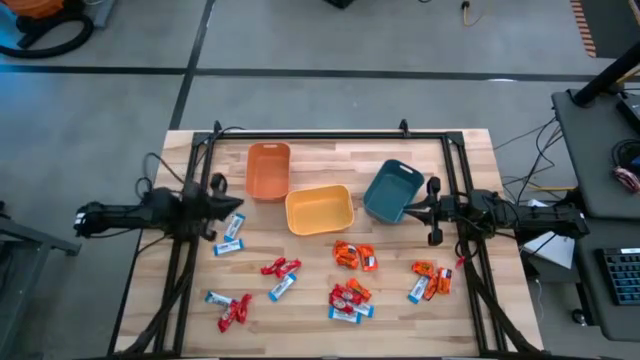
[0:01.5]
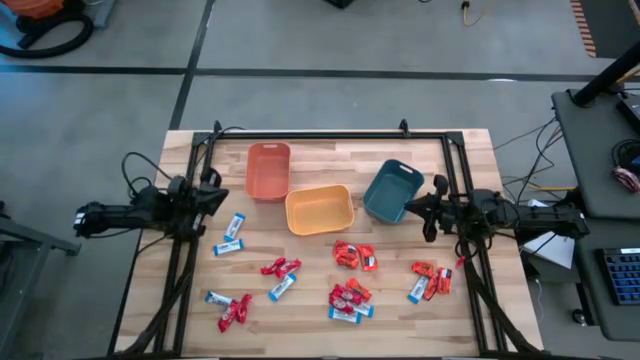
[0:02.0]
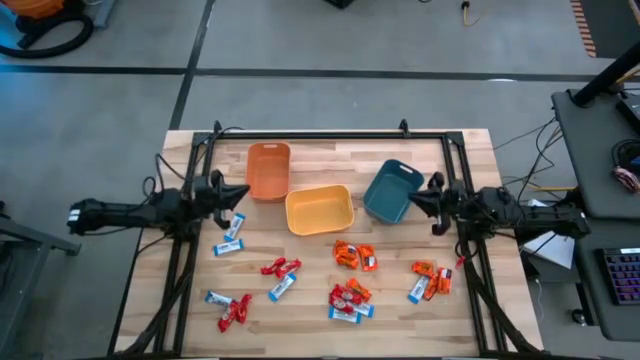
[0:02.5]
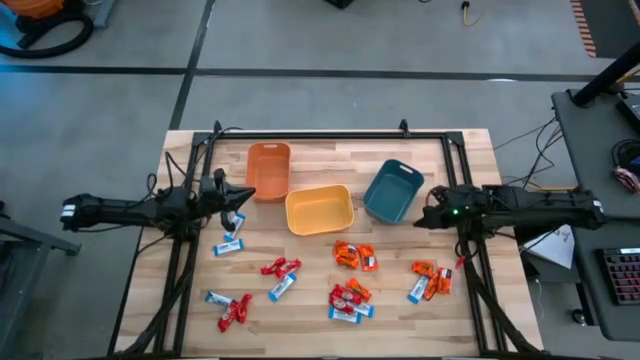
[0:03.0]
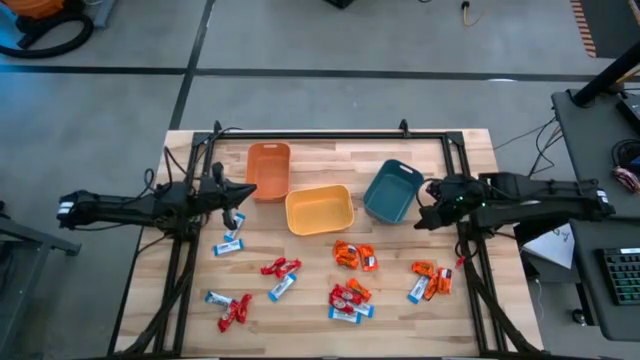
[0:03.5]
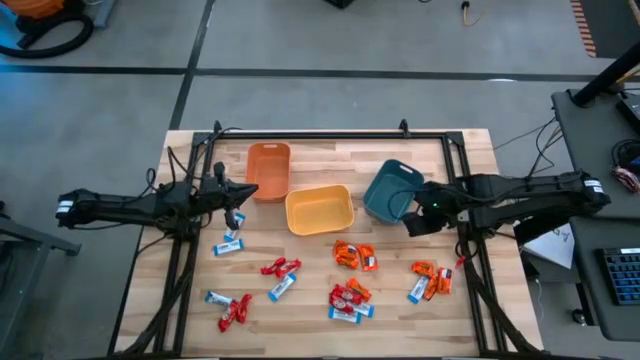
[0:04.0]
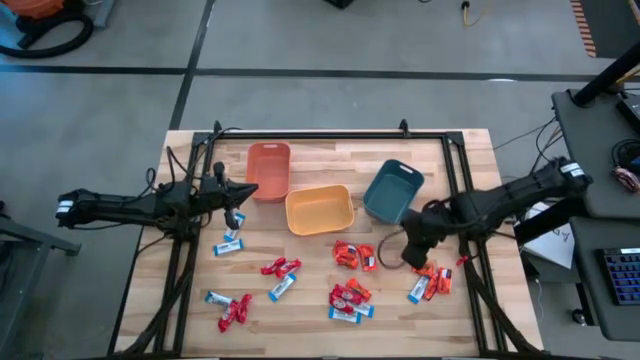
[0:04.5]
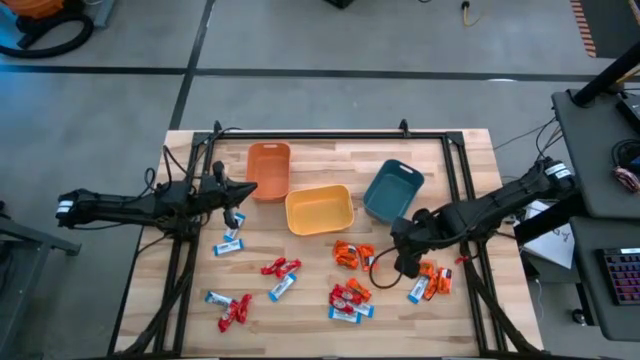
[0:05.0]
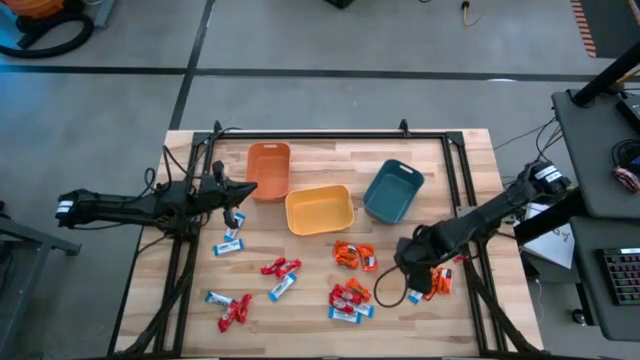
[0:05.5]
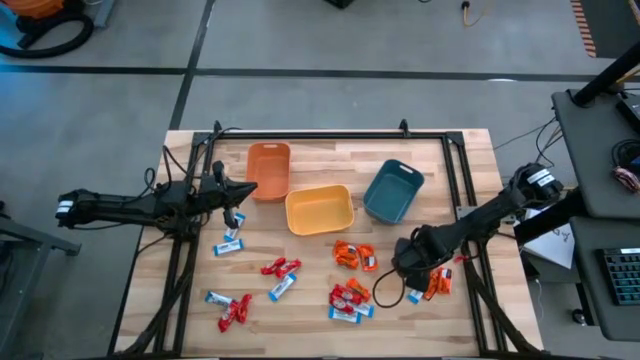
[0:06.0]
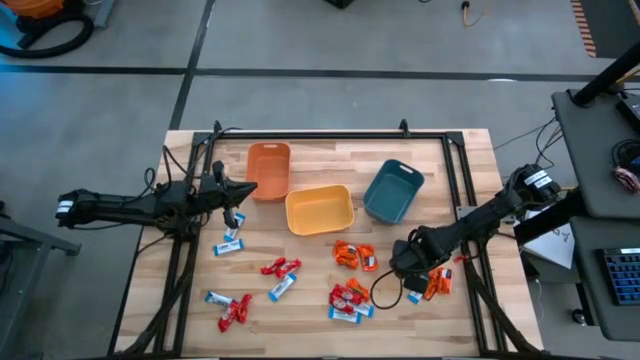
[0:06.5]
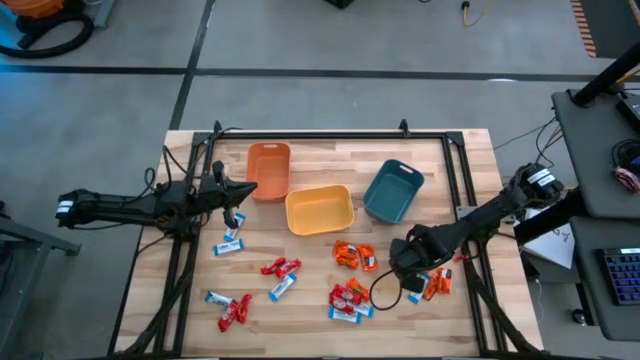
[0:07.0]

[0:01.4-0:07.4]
Task: Sort candy
Put the orange chocolate into the yellow bin

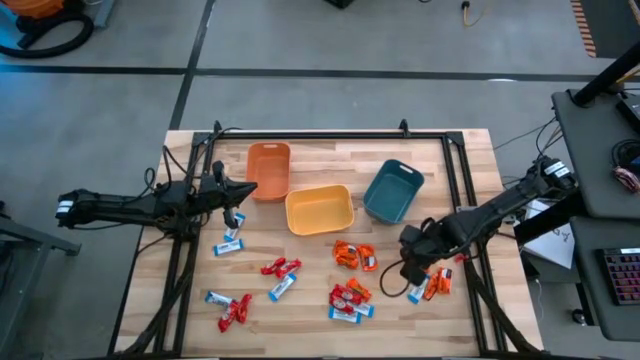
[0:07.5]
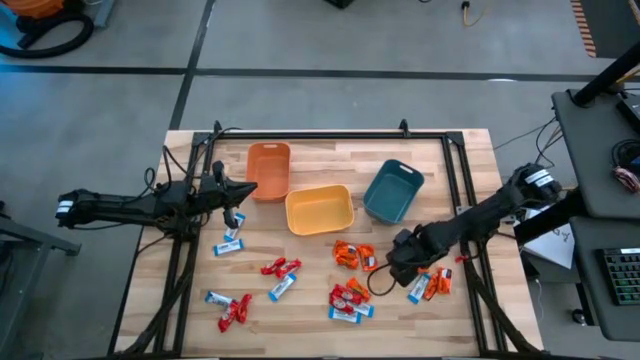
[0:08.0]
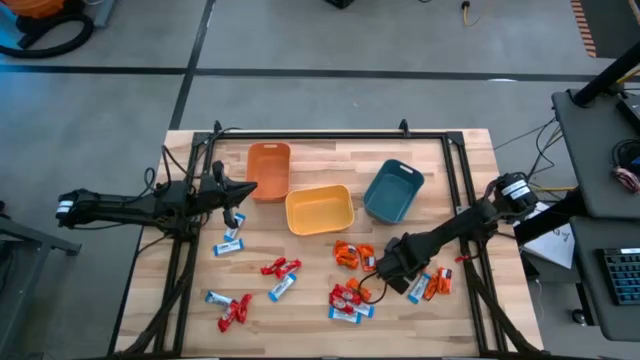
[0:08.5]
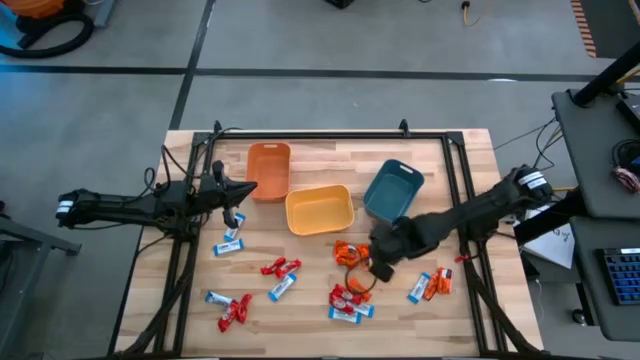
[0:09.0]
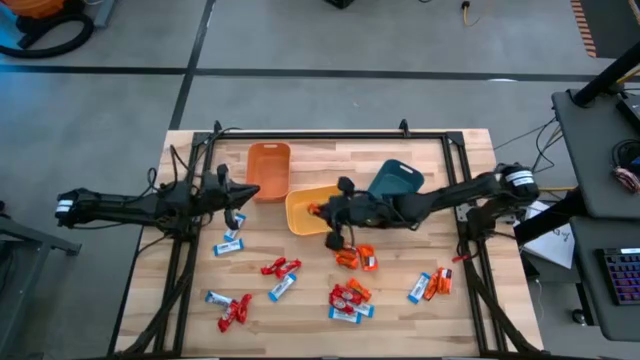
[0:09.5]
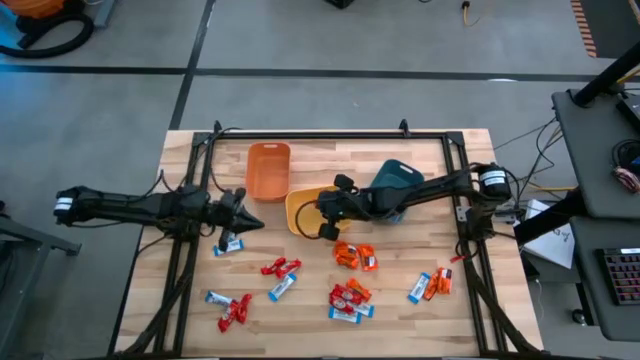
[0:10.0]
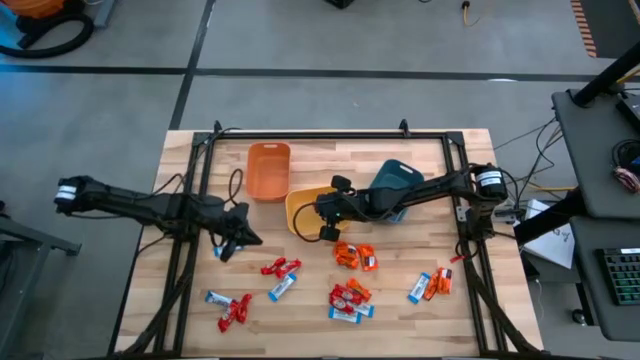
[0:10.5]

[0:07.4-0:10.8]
Put the orange chocolate into the yellow bin

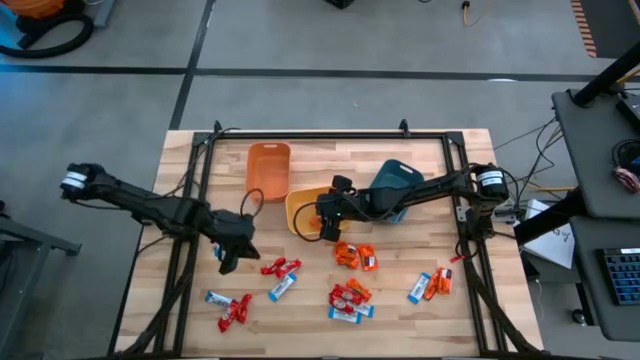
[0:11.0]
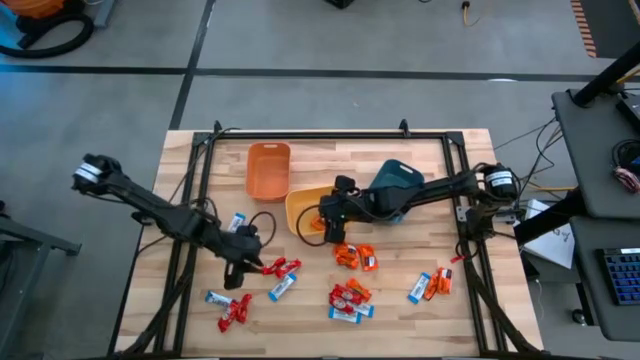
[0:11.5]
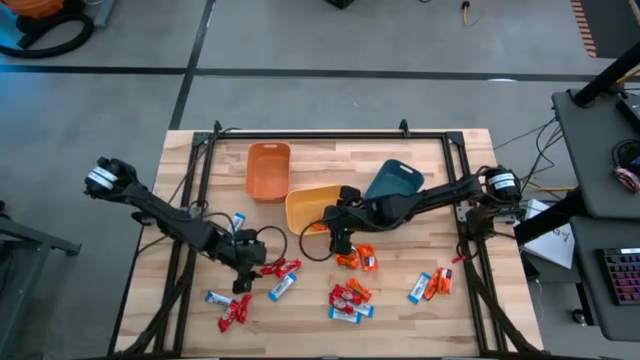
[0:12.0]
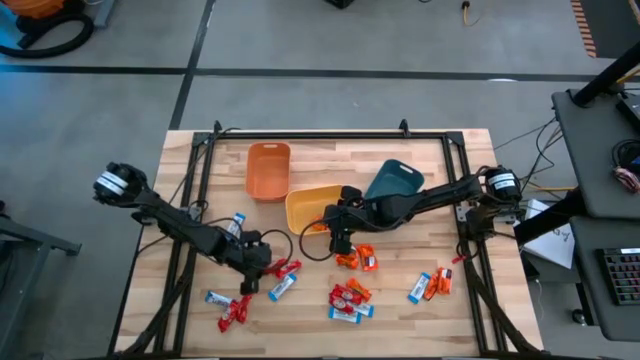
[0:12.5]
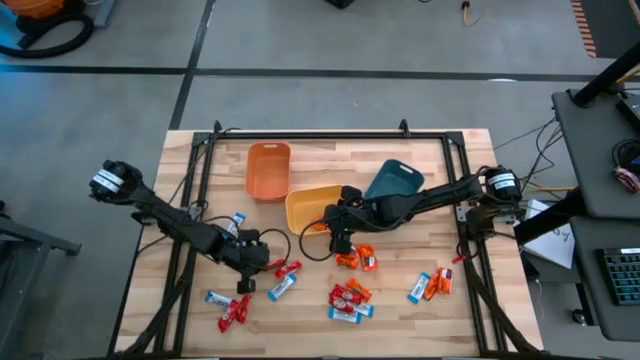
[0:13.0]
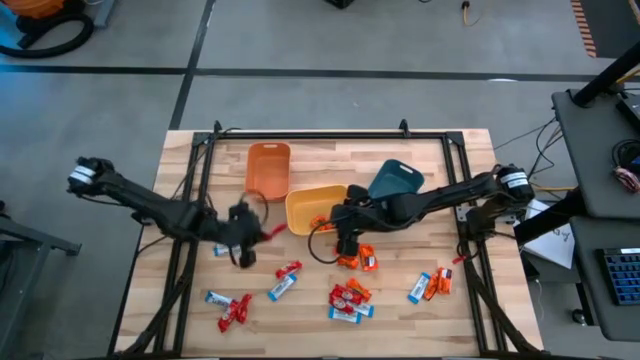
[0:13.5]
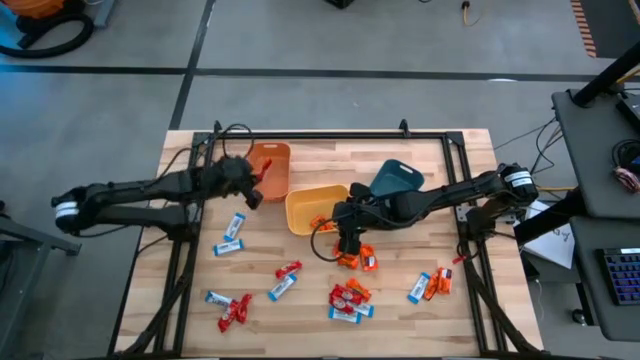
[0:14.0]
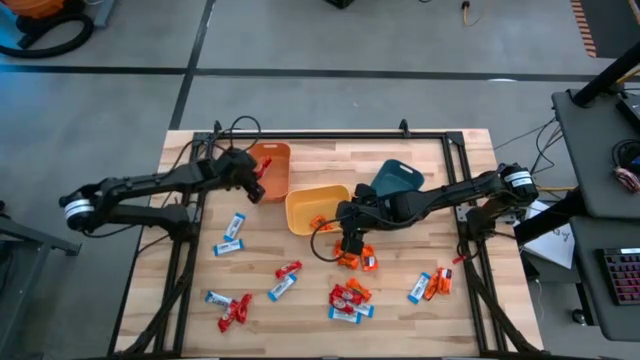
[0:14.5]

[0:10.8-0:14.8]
Put the red chocolate into the orange bin

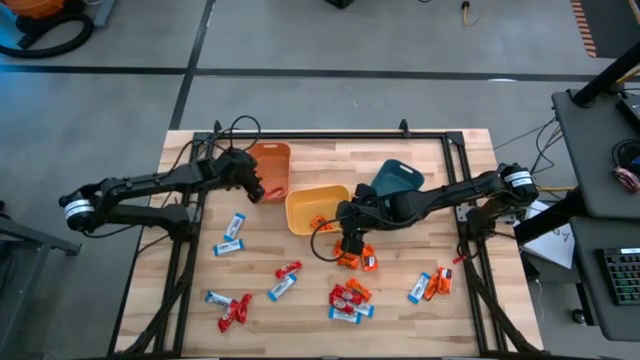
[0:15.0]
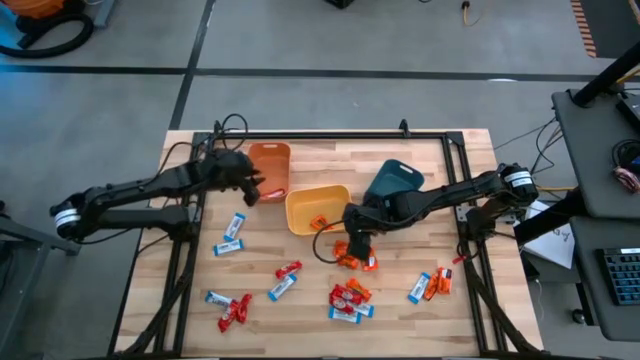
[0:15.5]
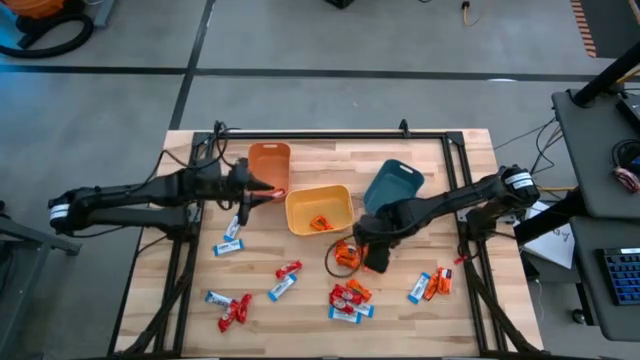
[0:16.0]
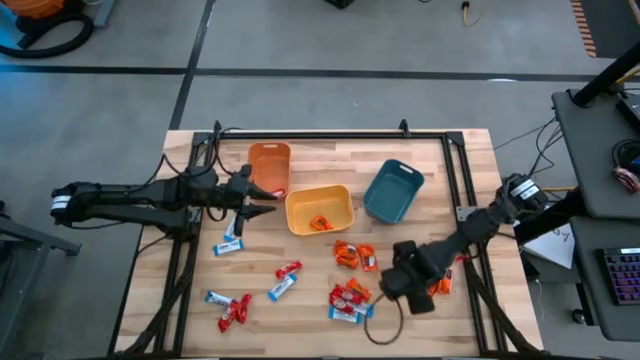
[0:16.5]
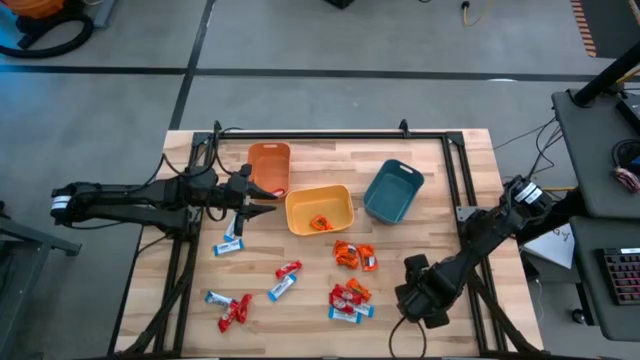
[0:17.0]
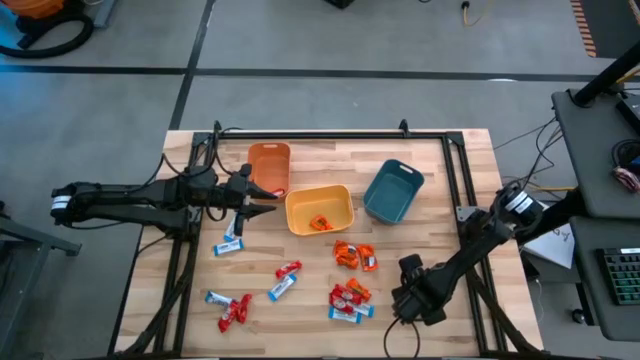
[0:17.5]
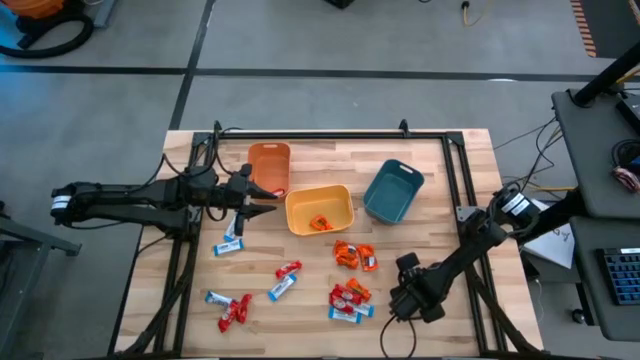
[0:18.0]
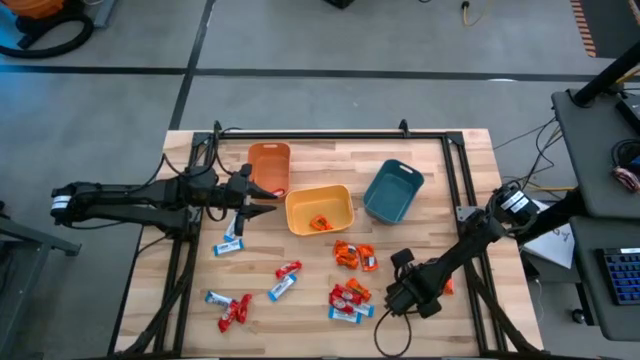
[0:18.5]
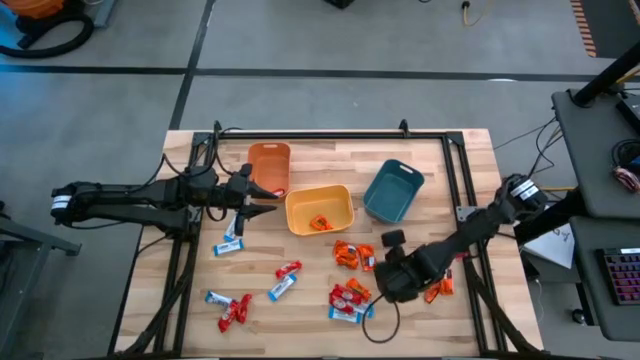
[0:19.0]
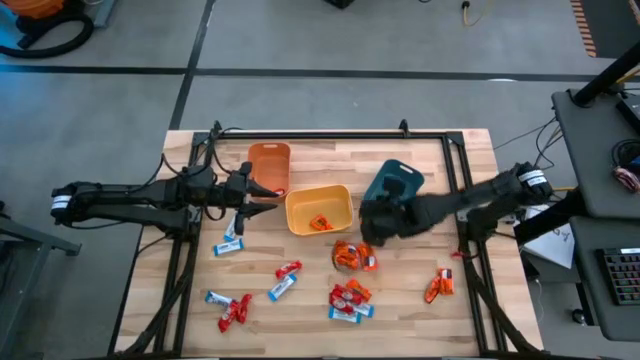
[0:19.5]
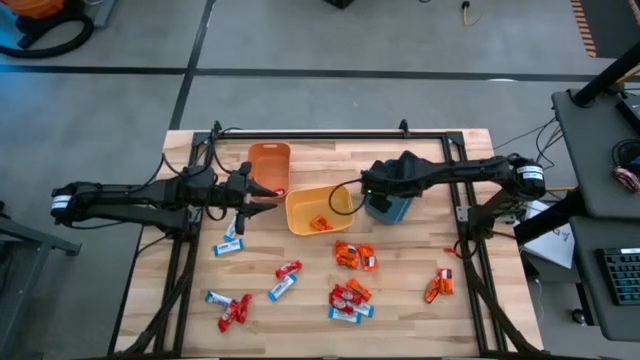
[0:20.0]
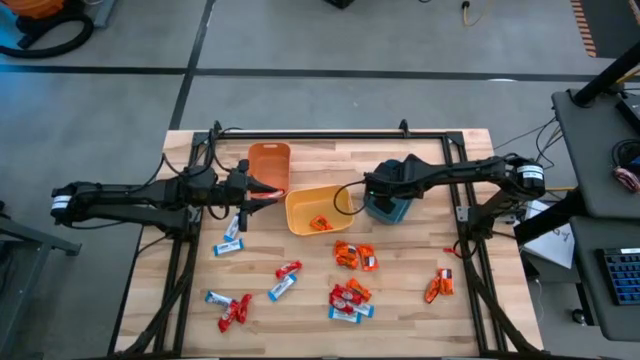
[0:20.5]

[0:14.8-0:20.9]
Put the white chocolate into the blue bin

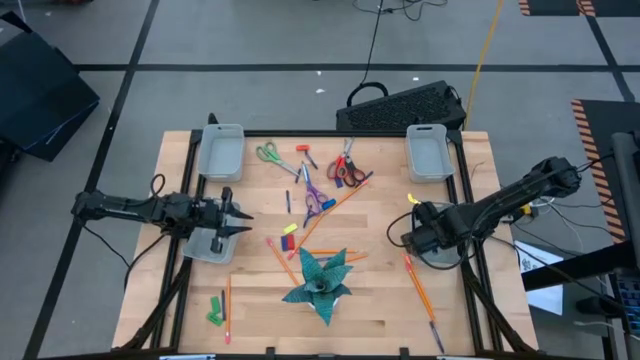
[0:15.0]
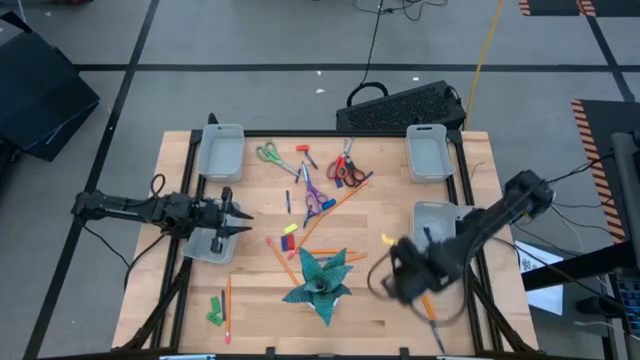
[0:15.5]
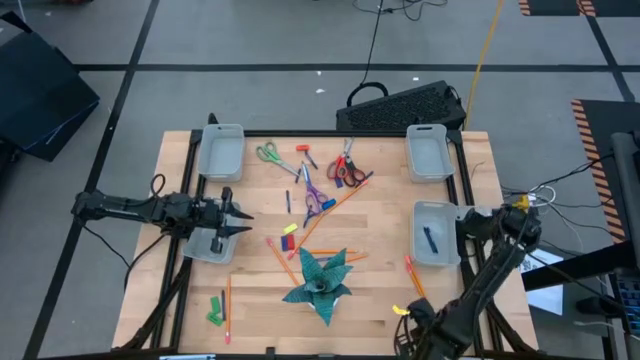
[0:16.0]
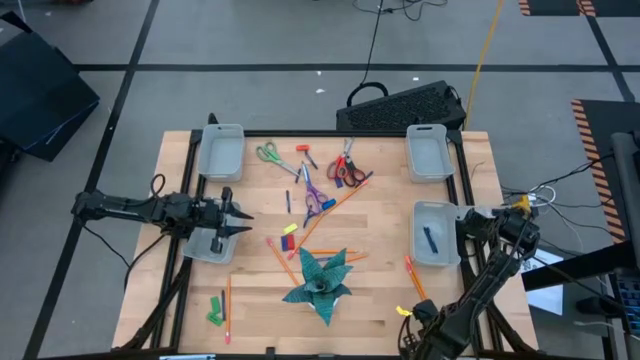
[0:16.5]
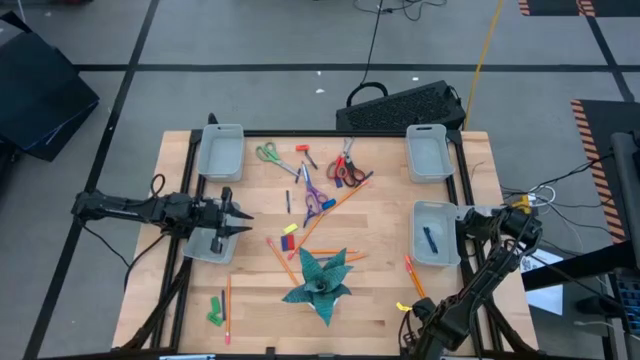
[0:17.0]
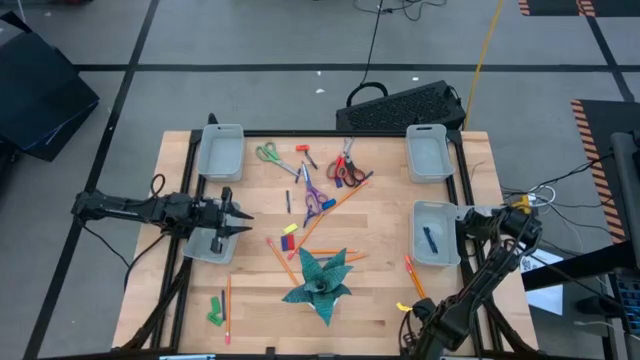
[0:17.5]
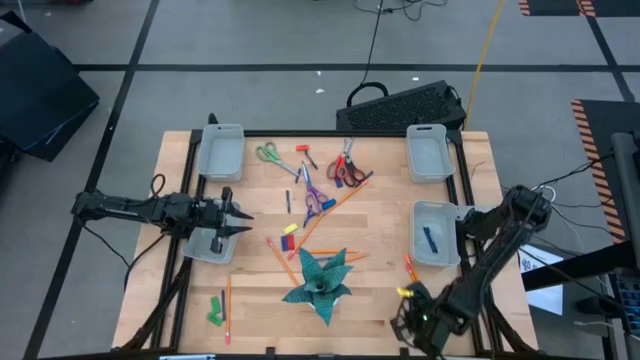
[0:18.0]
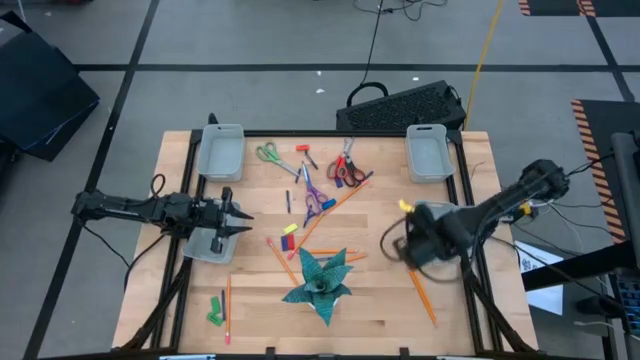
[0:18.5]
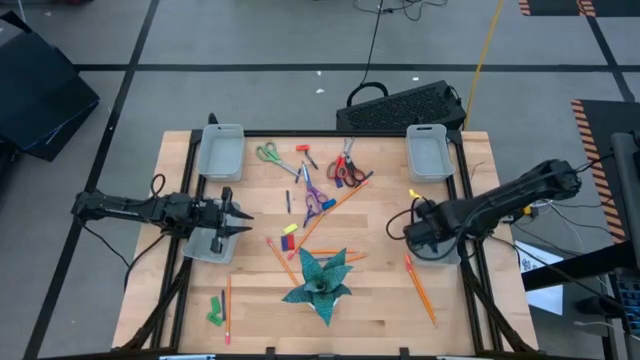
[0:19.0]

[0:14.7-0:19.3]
Task: Sort crayons/erasers/pens/pencils in bins
Put the blue crayon into the bottom right gray bin
